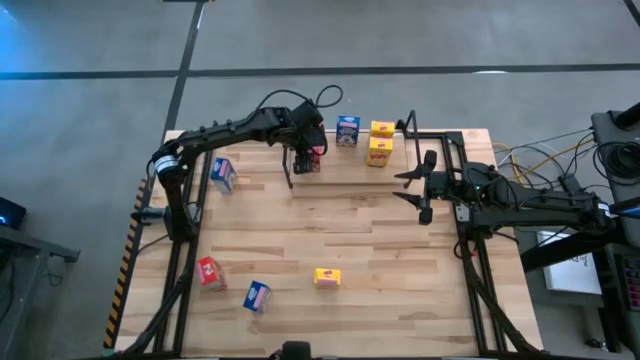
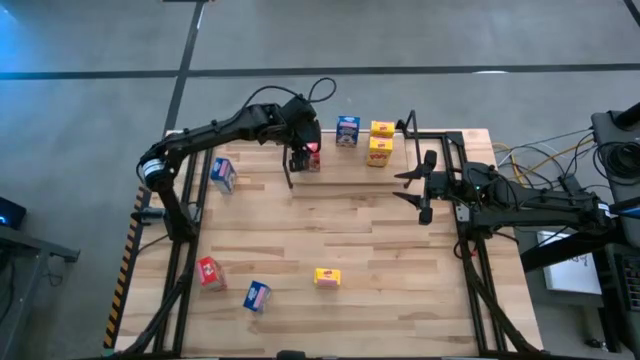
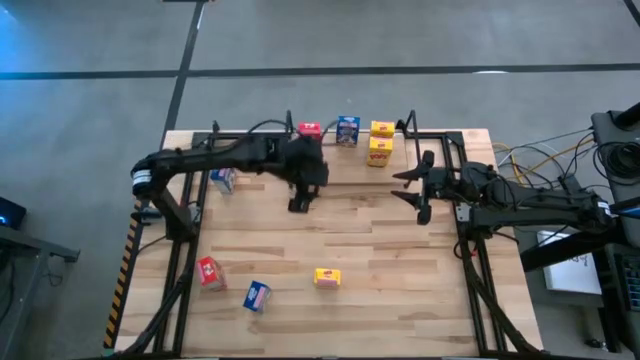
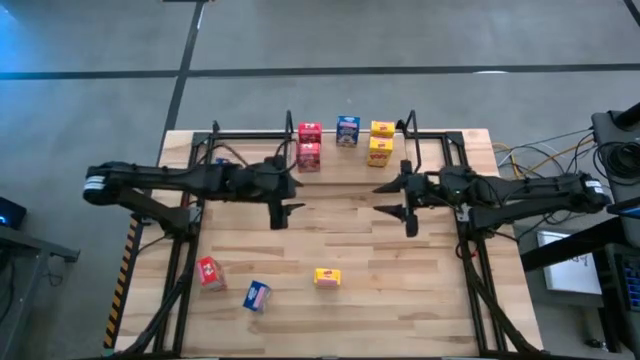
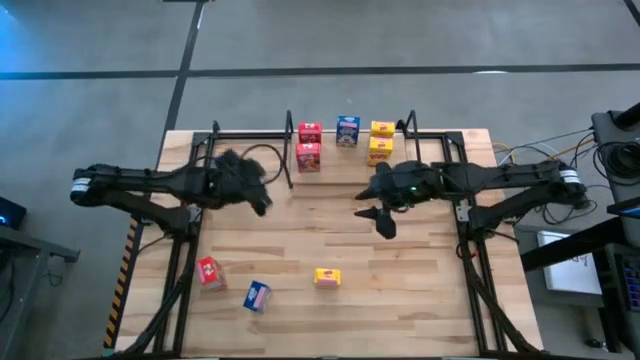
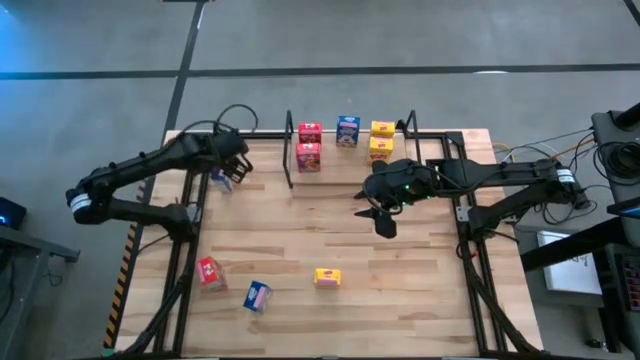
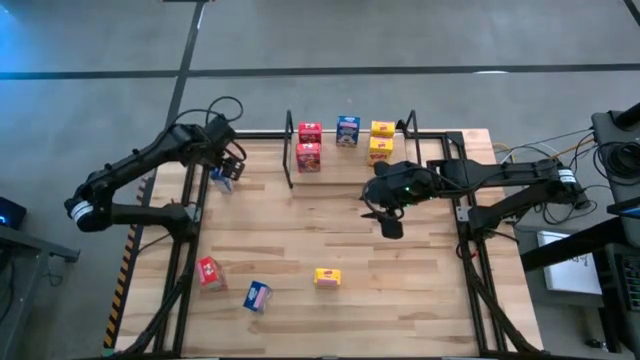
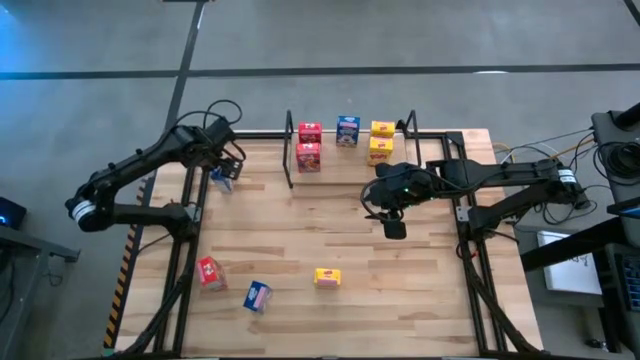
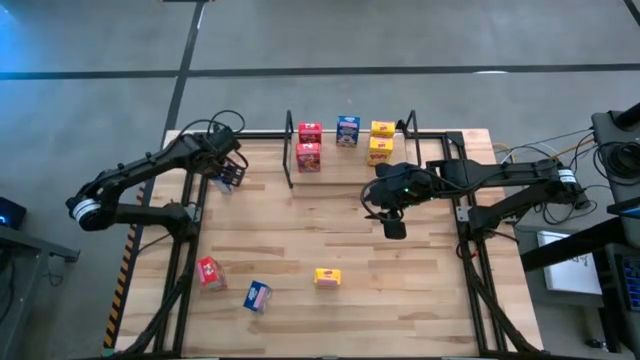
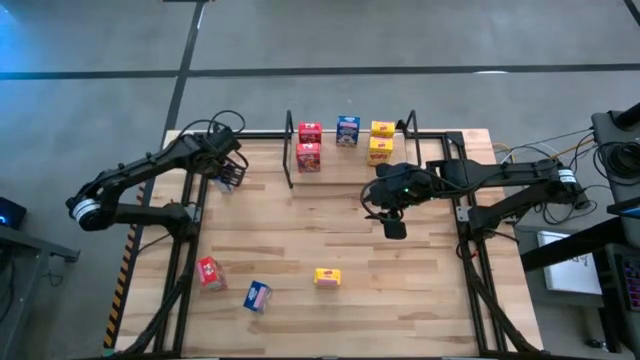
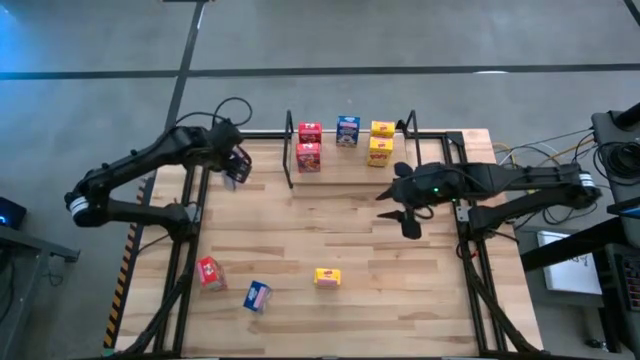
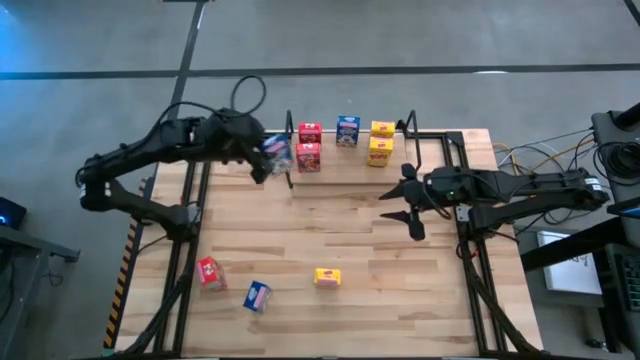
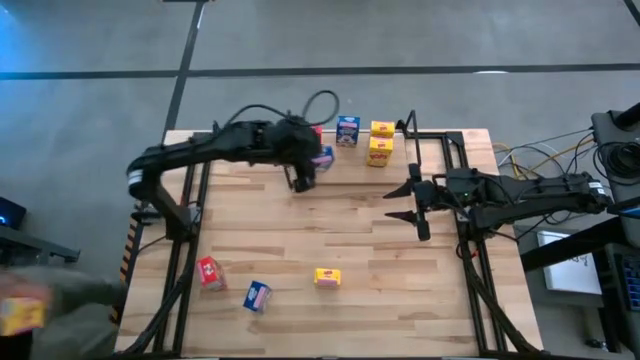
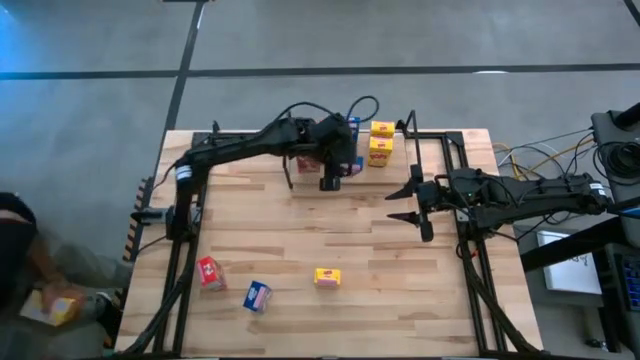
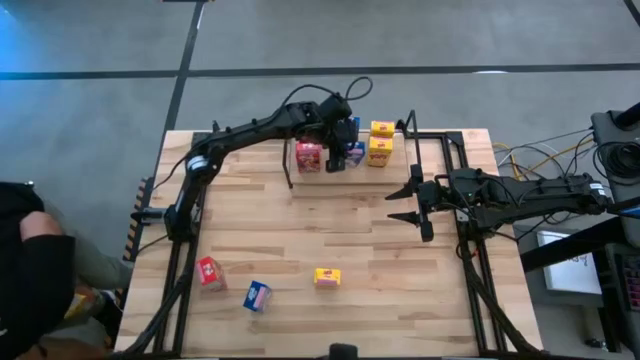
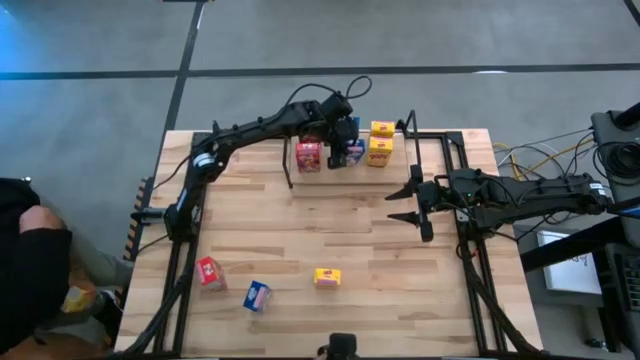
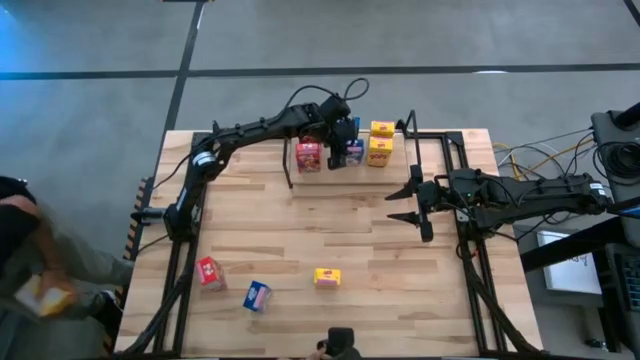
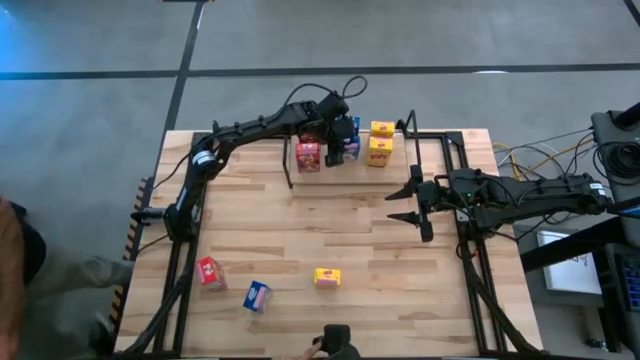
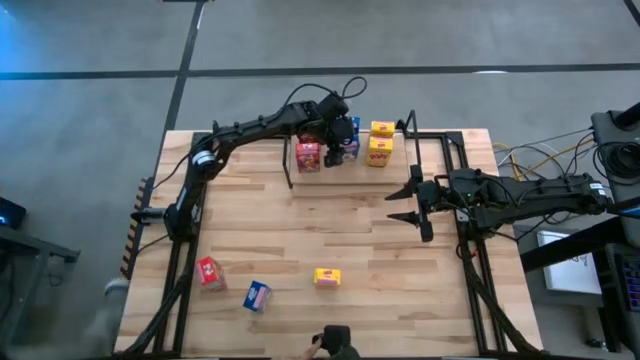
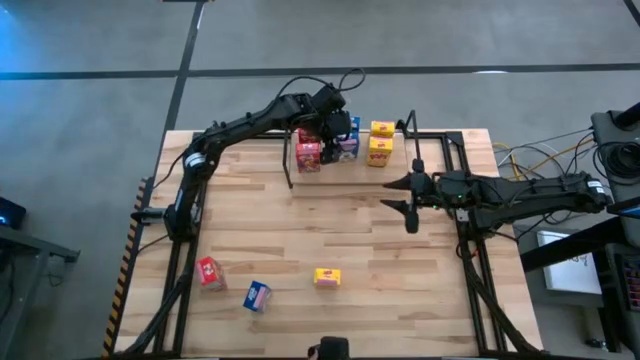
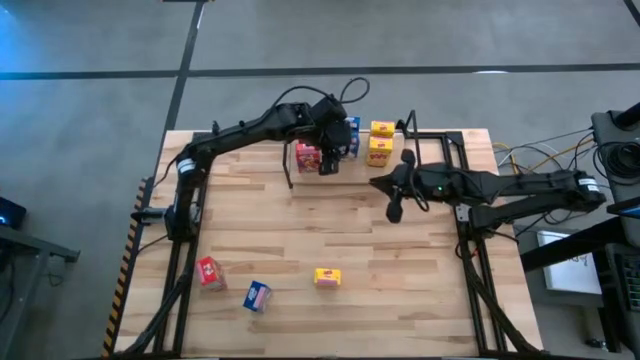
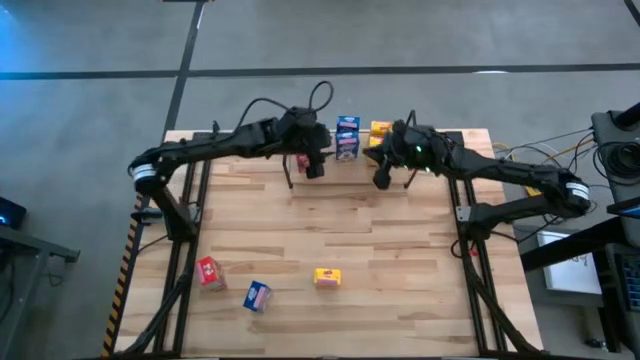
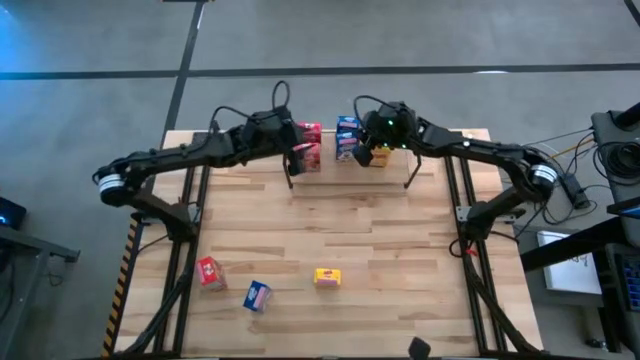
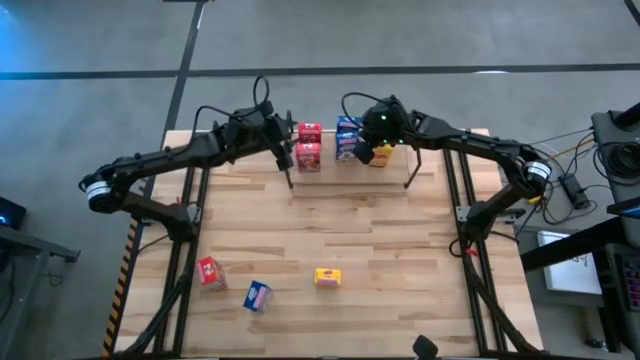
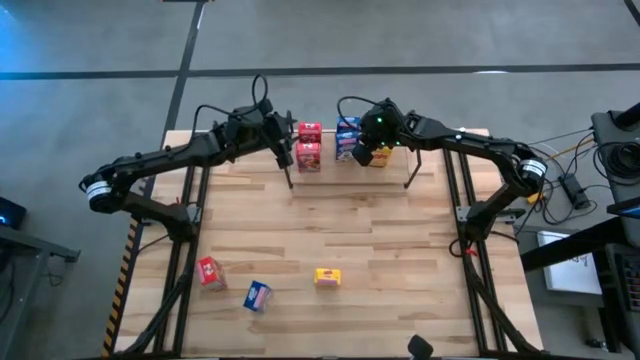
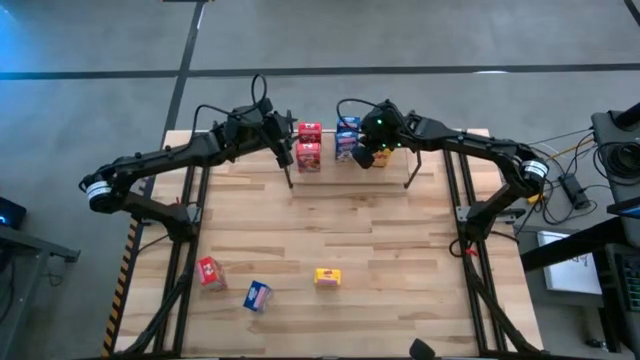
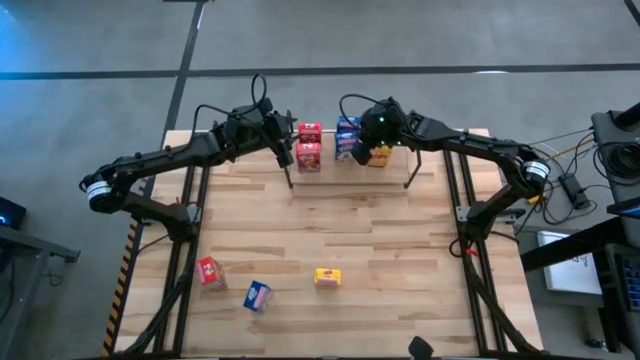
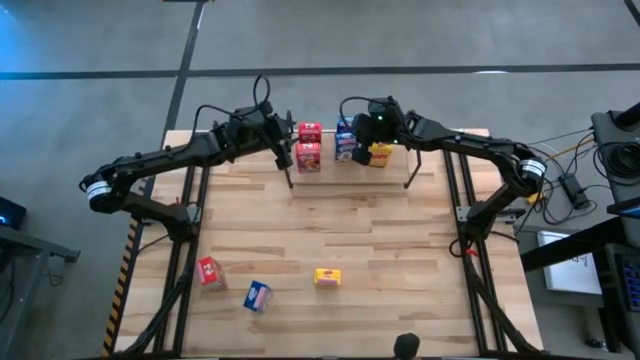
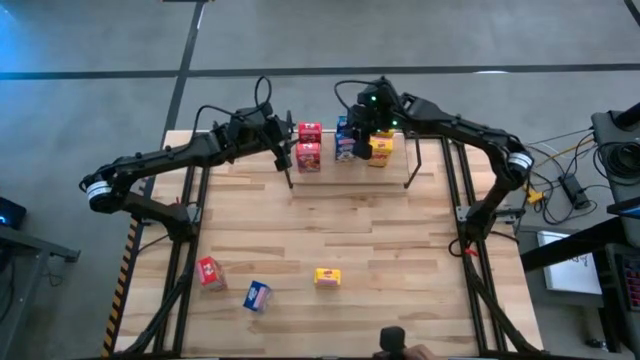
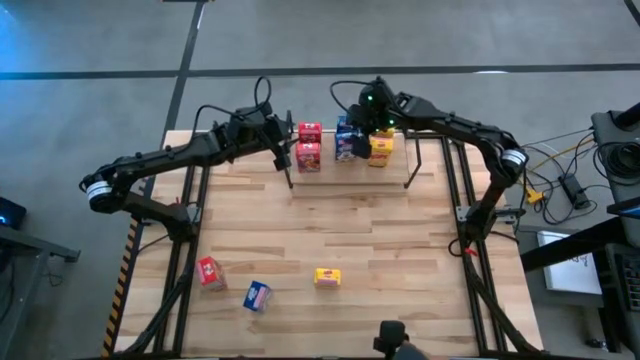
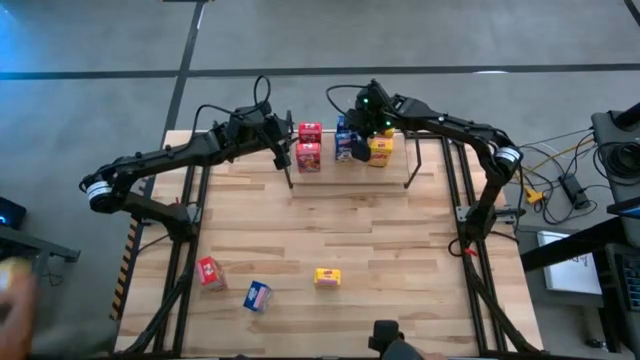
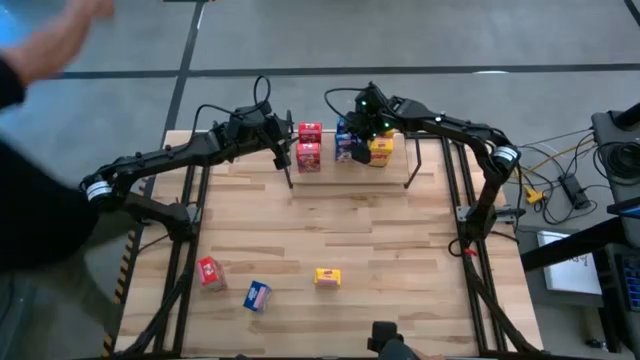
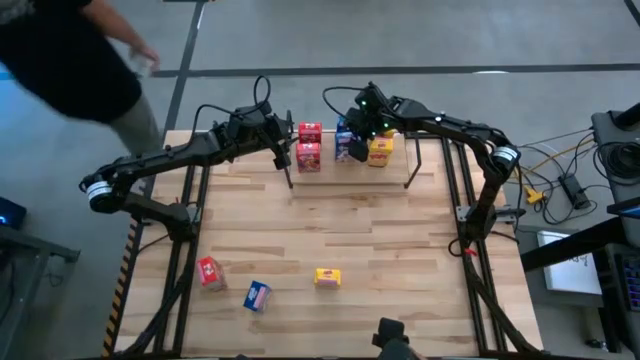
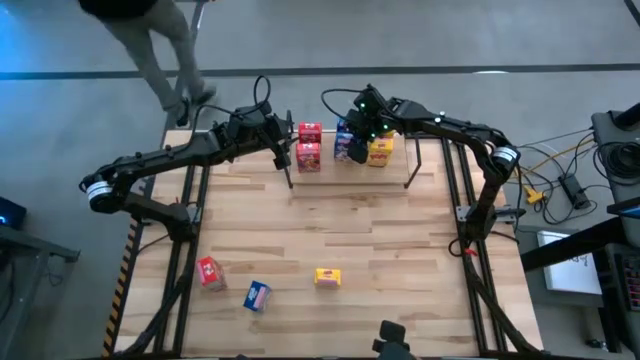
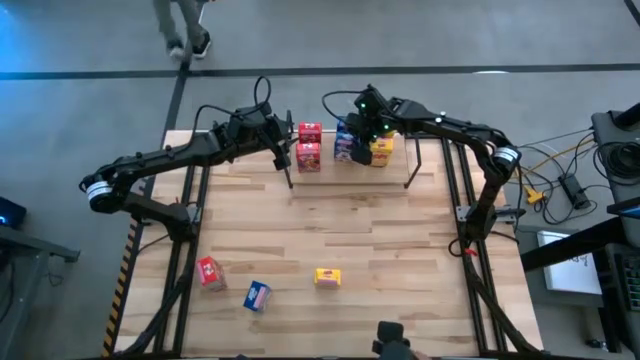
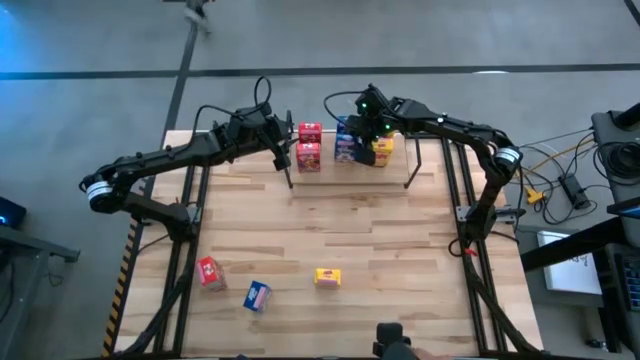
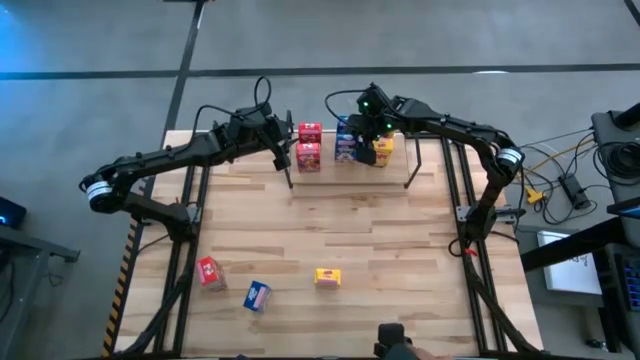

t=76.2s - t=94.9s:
Task: Stack cereal on shelf
Put the top blue cereal box on the shelf aligned with the other blue cereal box

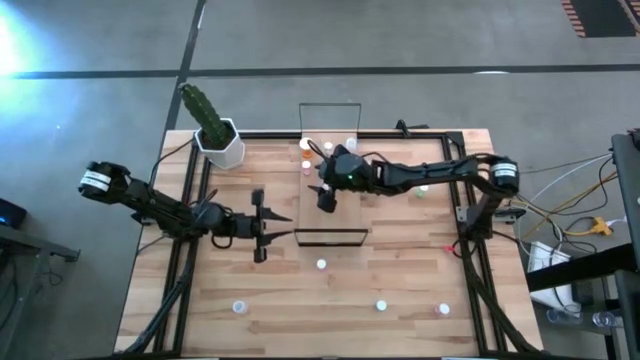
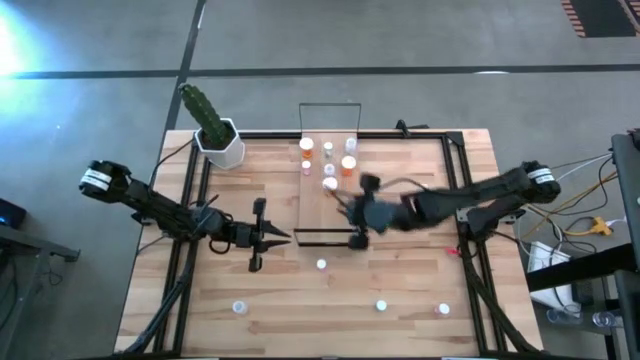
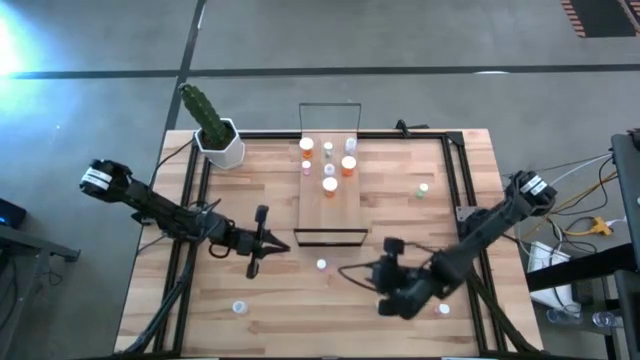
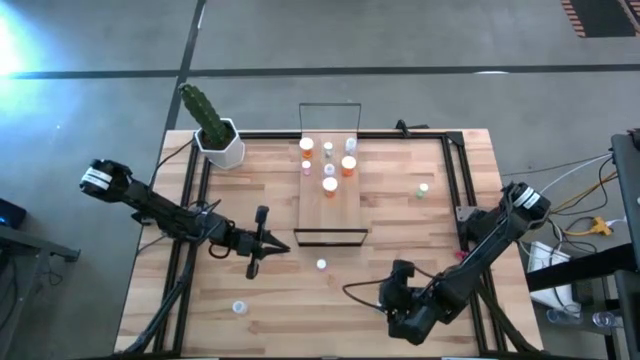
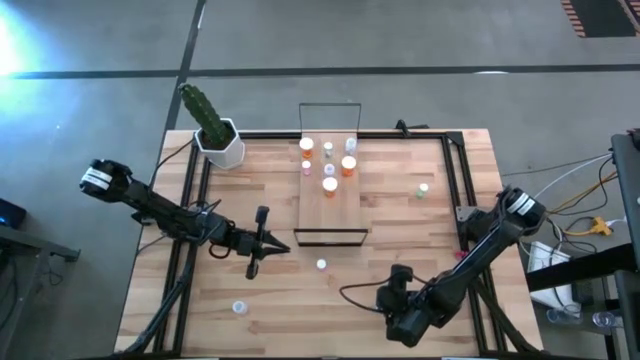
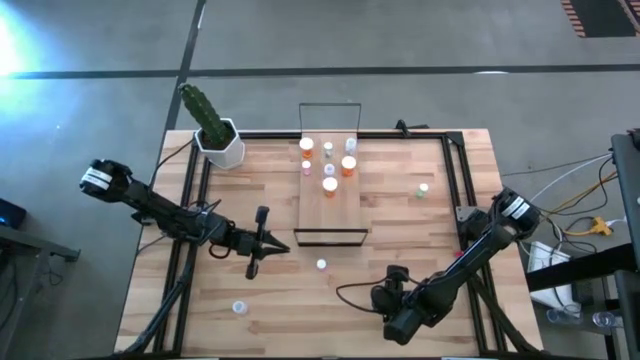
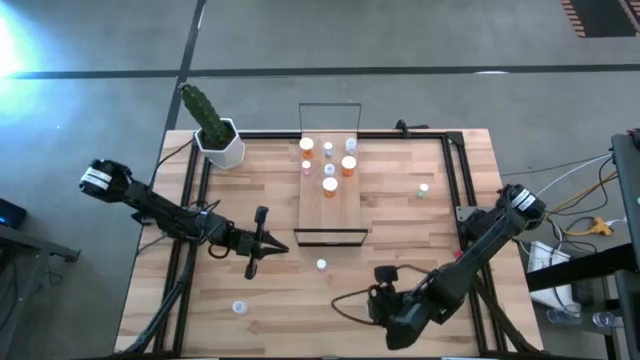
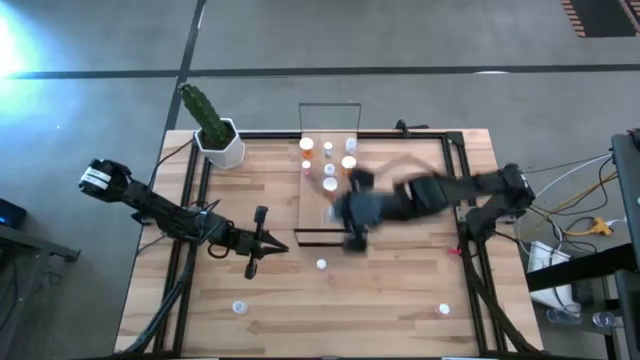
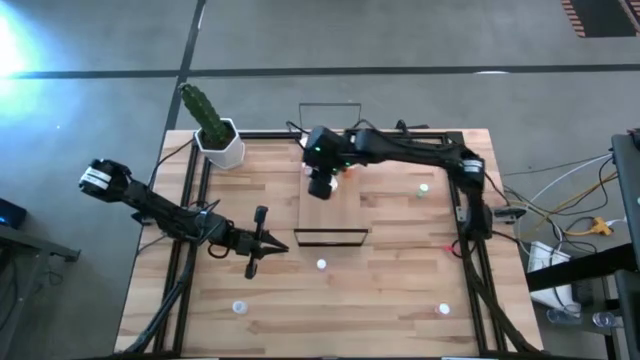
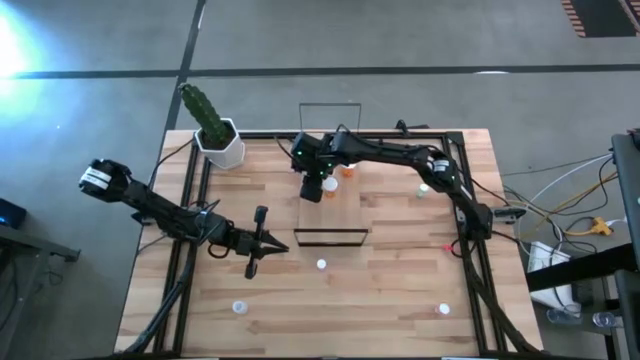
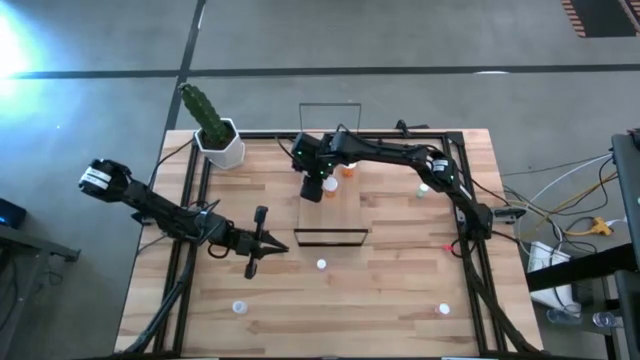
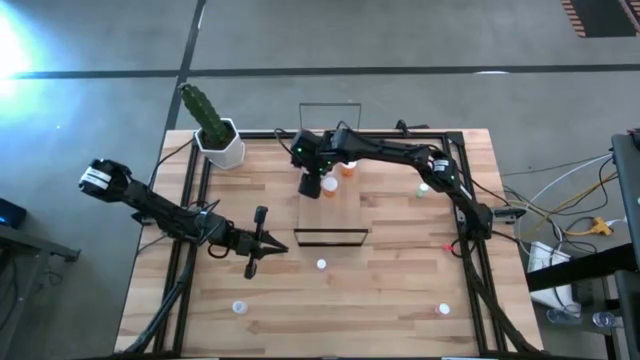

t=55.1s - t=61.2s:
Task: Pick and place medicine bottles onto shelf by color
Put the white transparent pill bottle on the shelf
